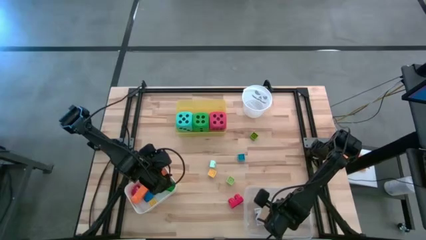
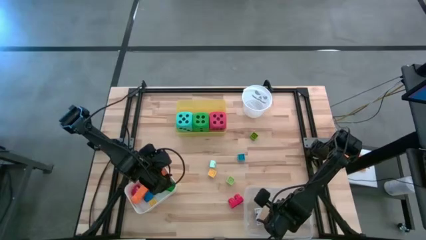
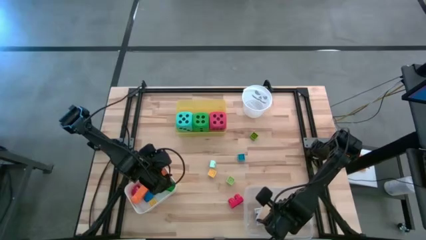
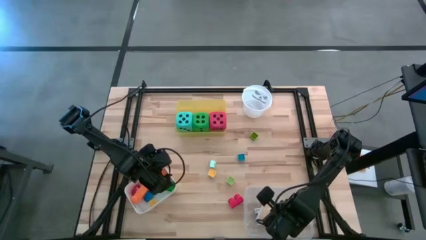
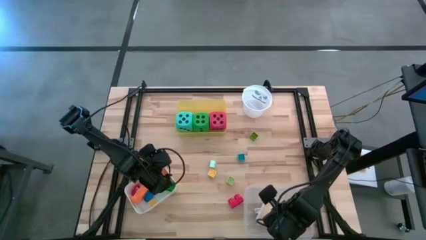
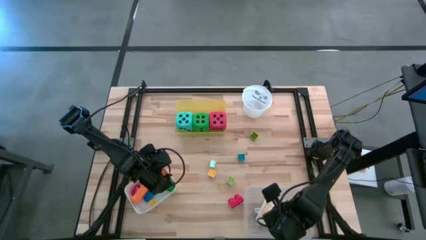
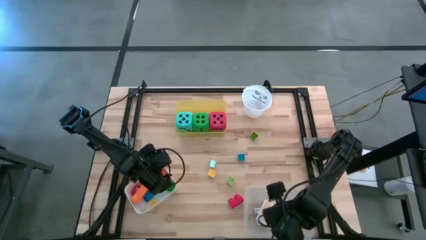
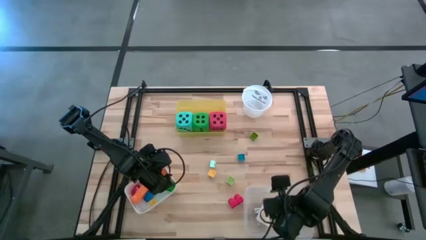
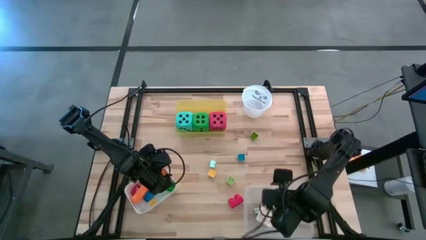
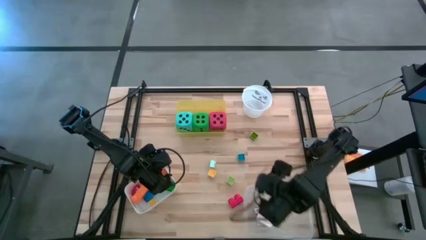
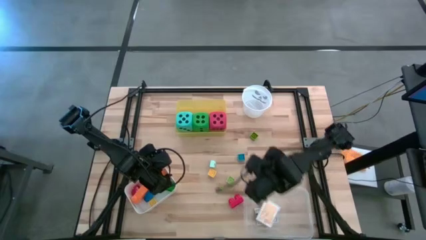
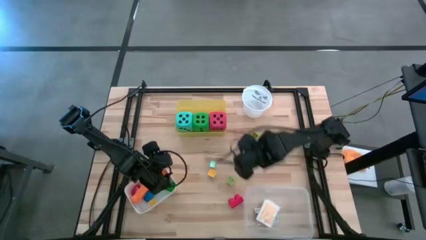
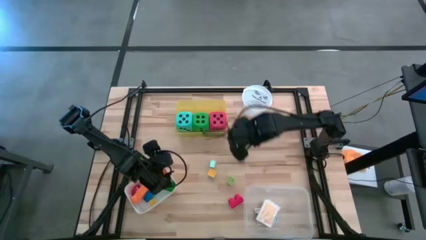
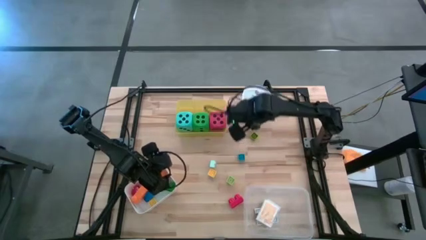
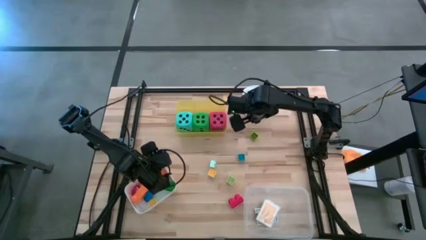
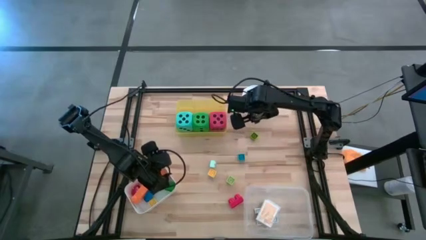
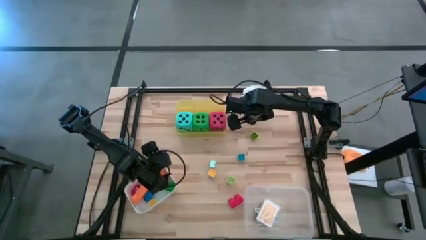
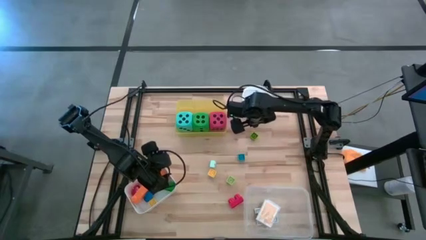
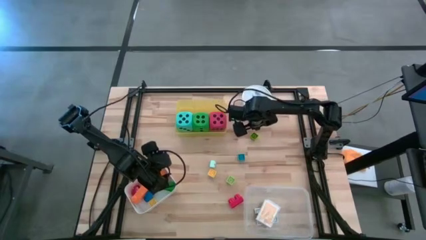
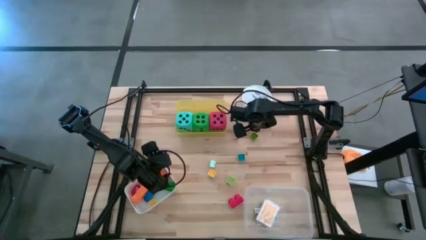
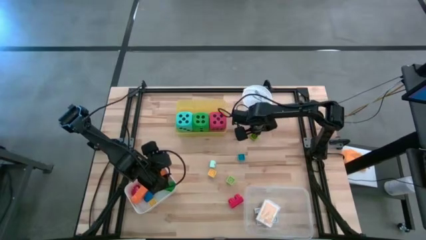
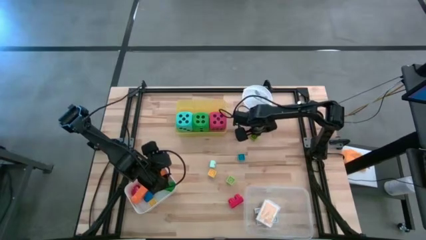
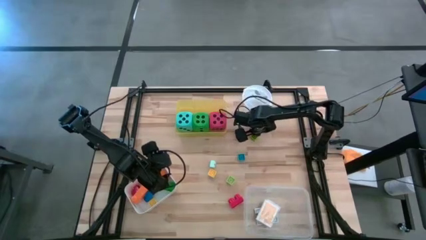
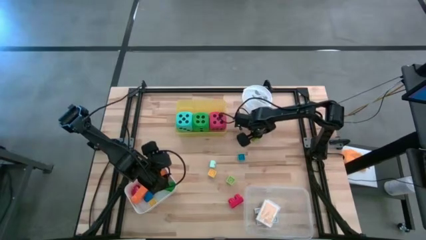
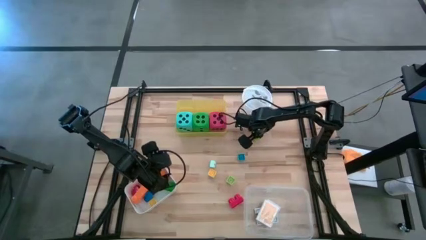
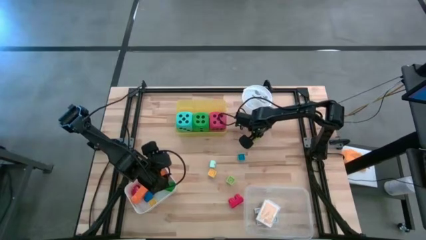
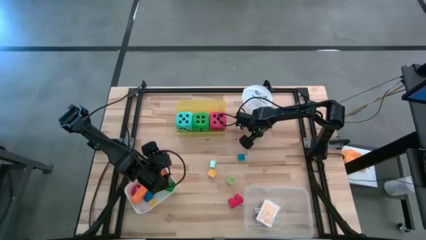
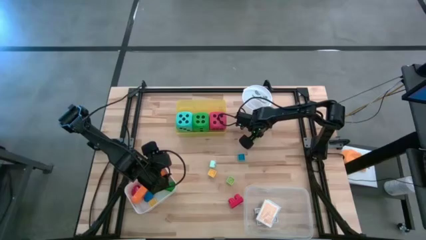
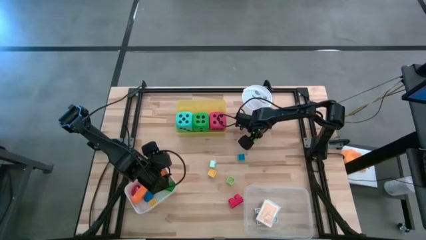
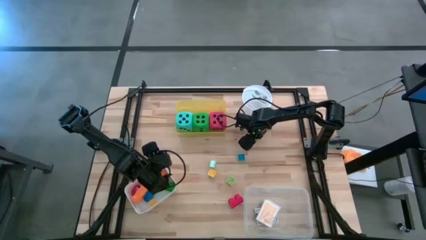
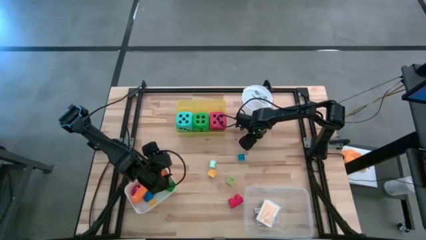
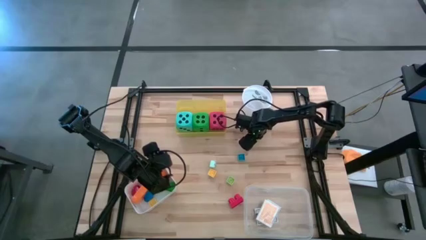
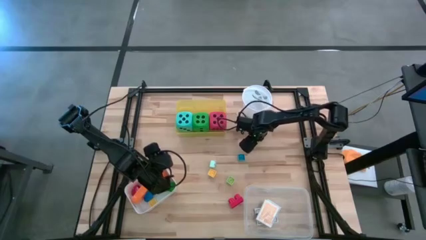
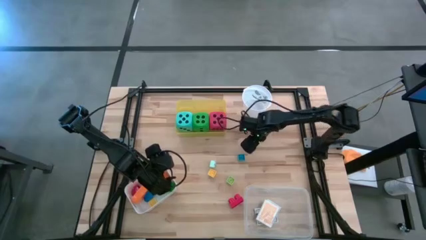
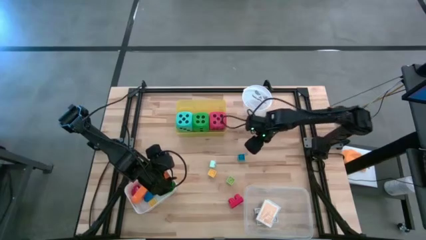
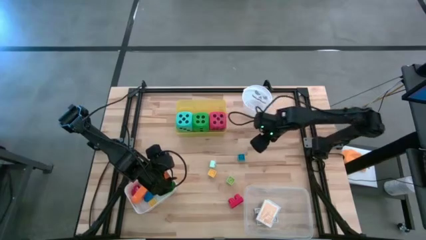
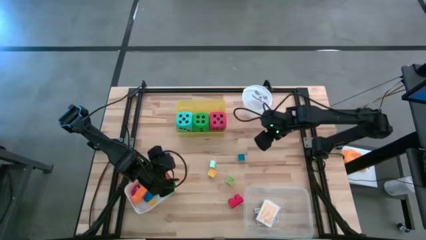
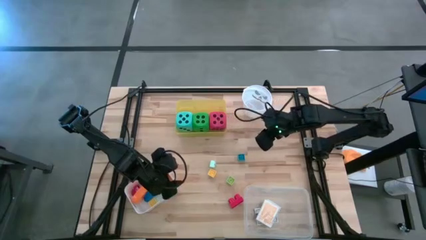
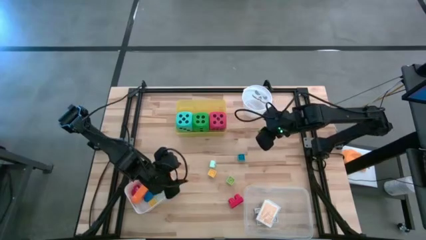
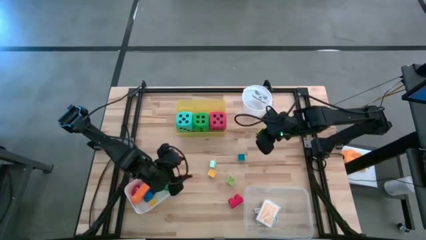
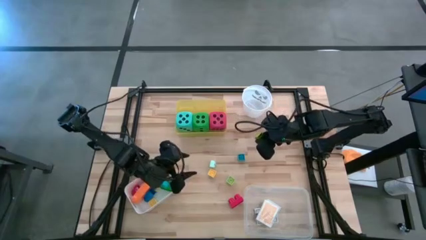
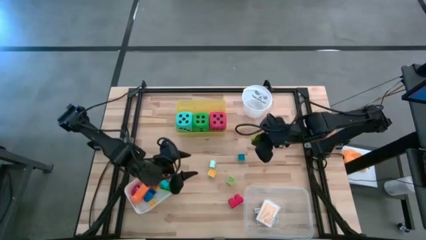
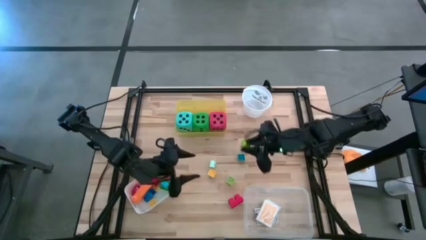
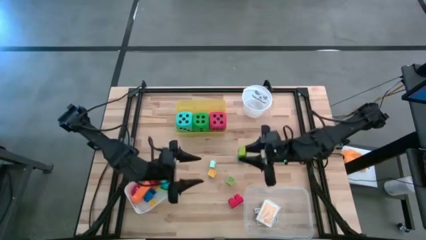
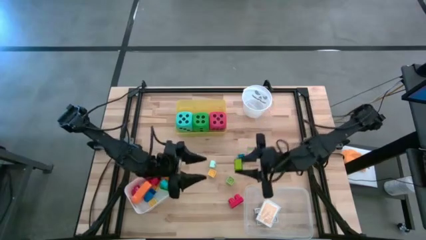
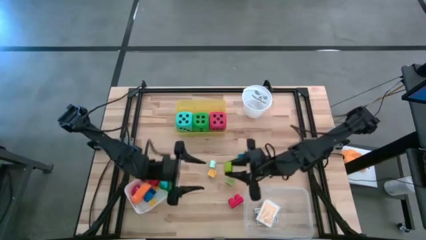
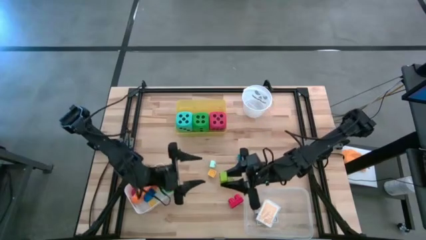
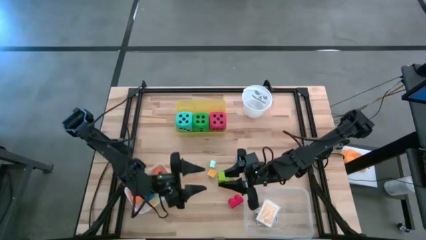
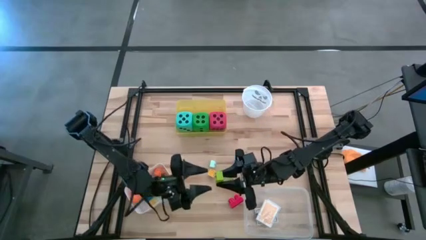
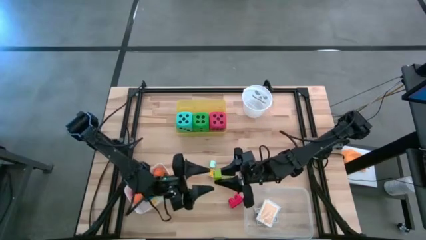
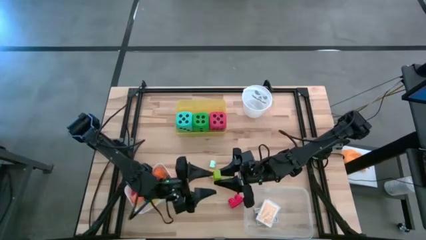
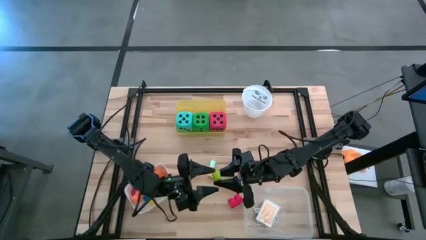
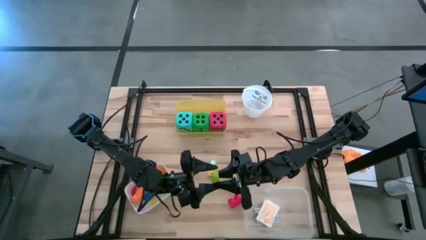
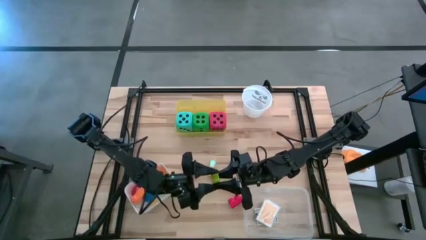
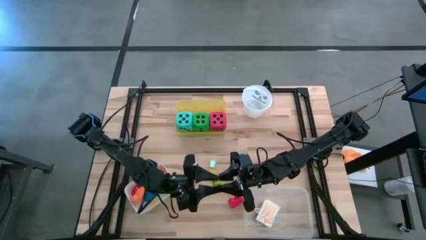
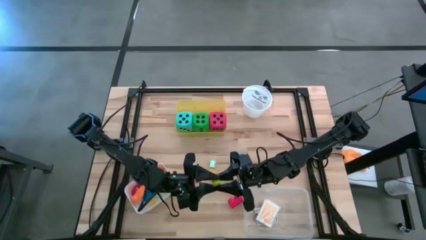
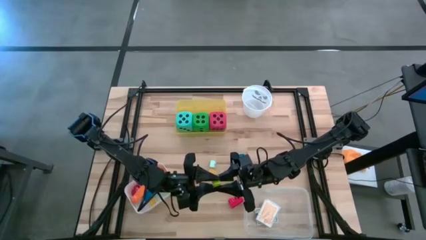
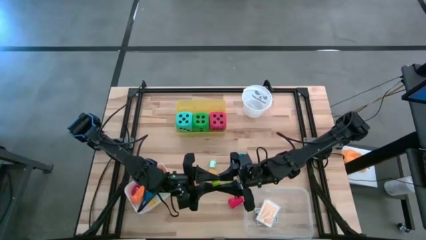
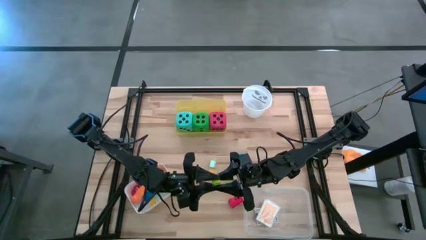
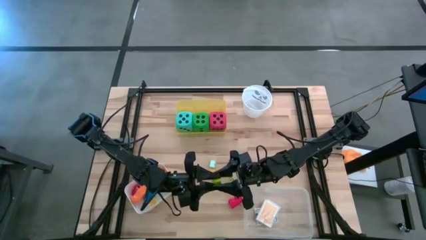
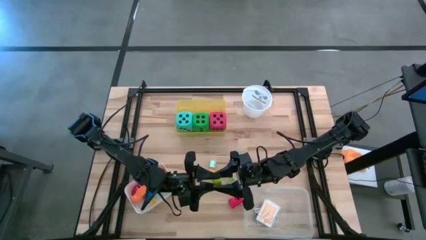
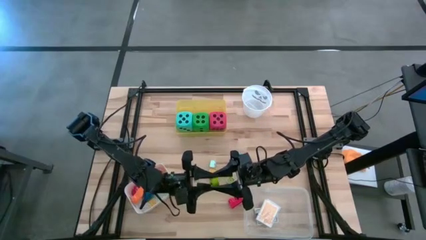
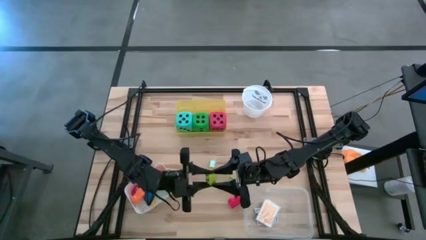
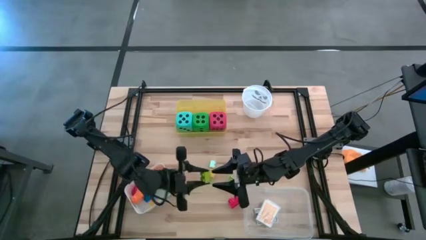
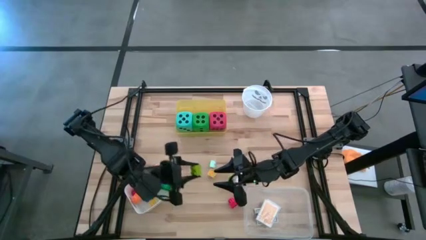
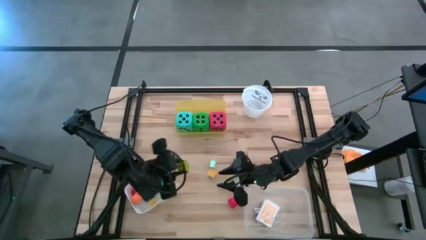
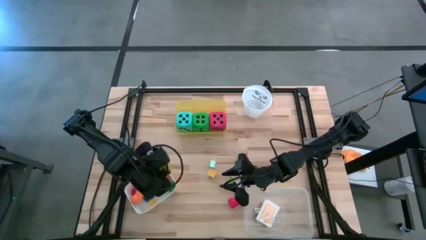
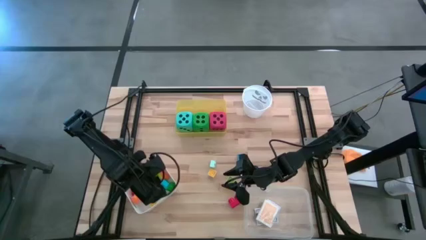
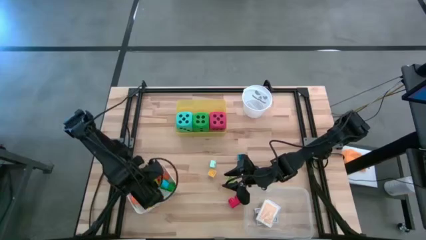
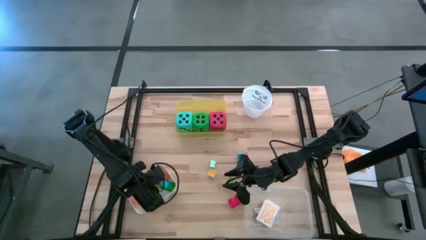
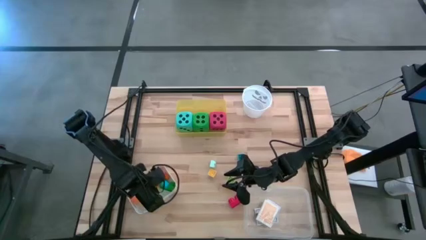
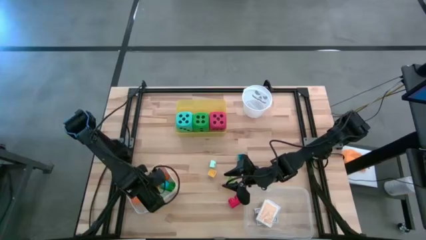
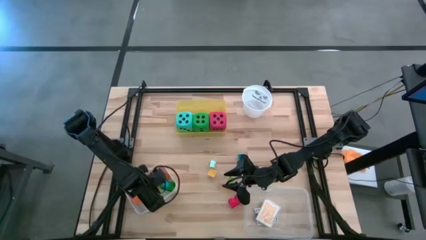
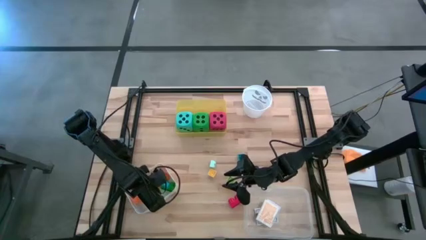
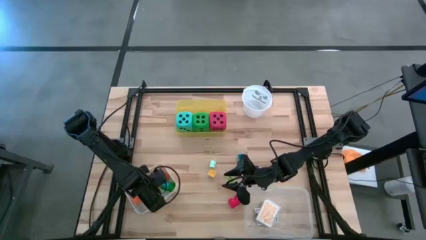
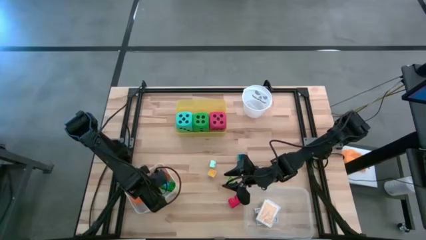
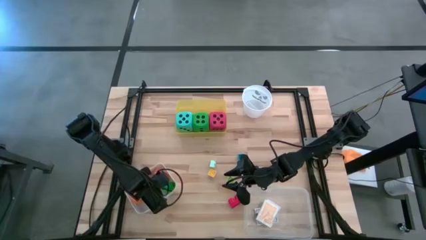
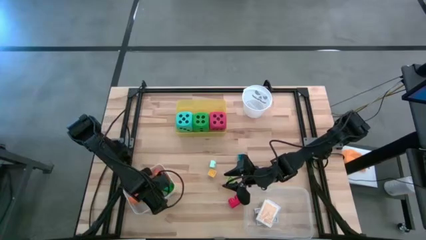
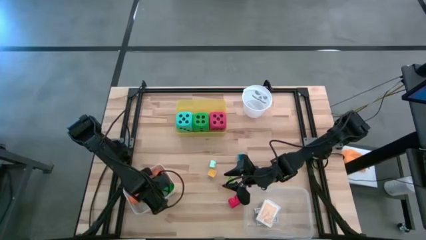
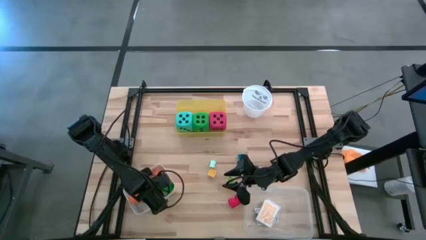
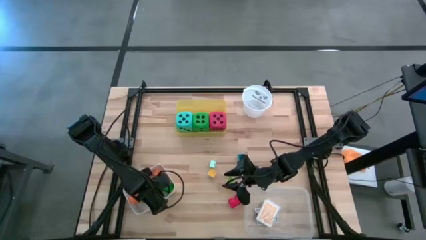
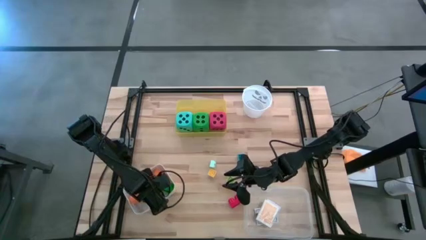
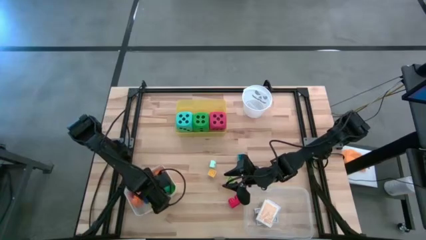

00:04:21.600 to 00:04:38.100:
Task: Pick & Place Toys
Put the top light green game piece into the white bin
